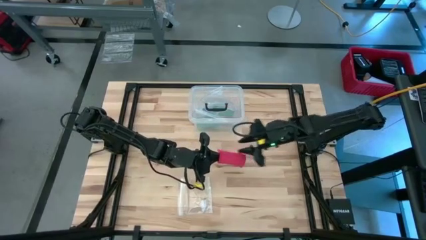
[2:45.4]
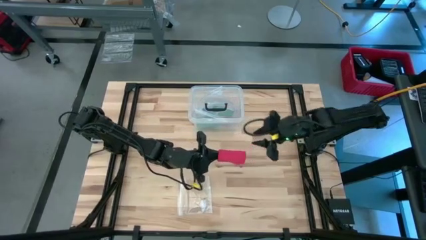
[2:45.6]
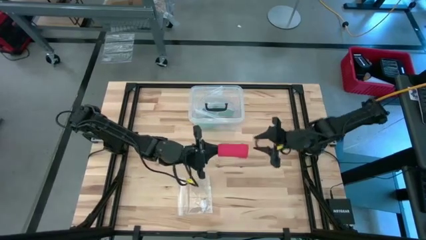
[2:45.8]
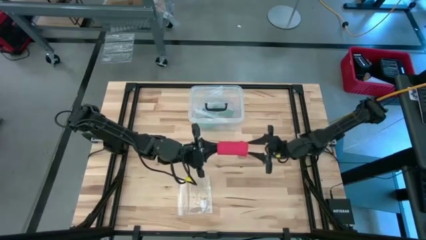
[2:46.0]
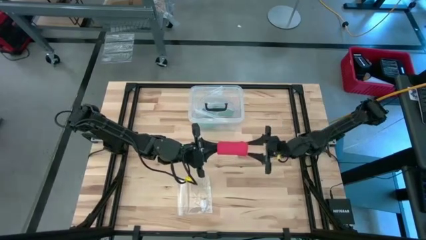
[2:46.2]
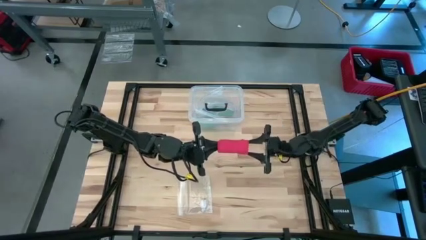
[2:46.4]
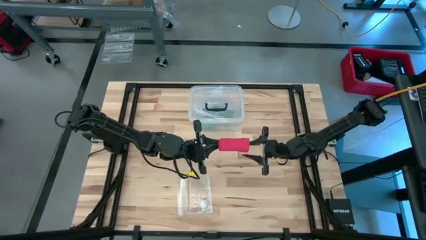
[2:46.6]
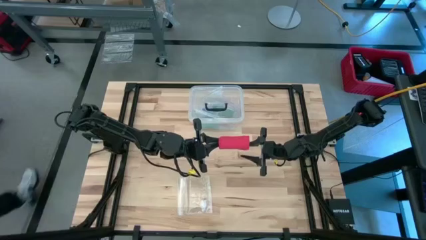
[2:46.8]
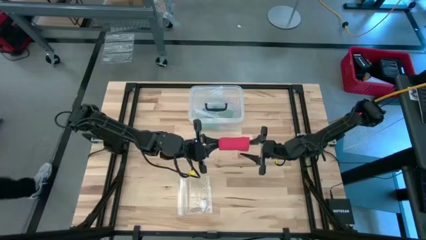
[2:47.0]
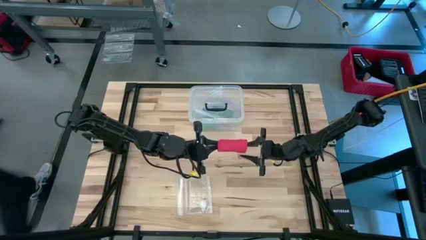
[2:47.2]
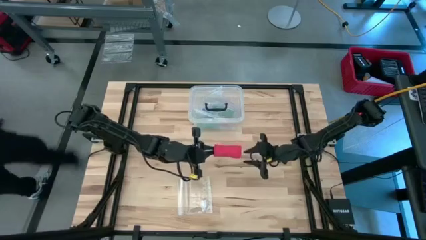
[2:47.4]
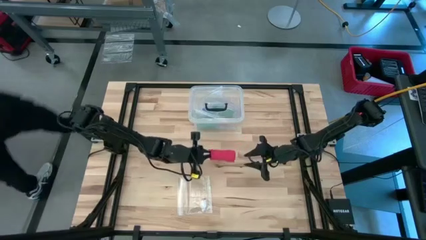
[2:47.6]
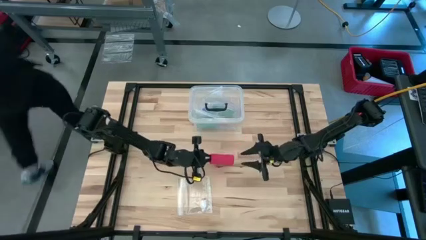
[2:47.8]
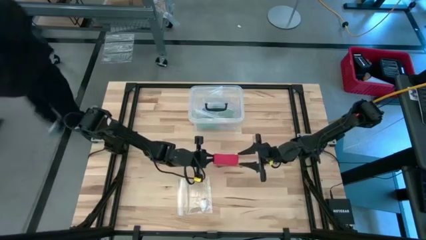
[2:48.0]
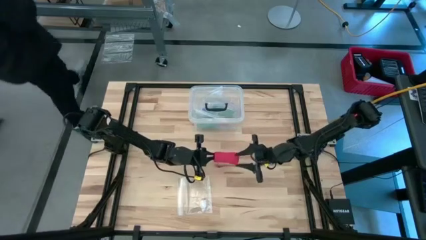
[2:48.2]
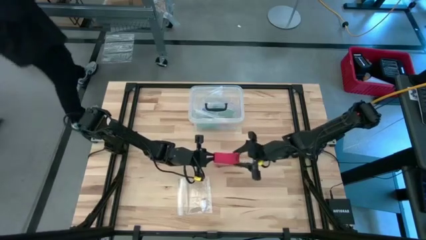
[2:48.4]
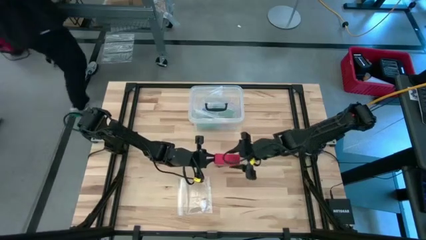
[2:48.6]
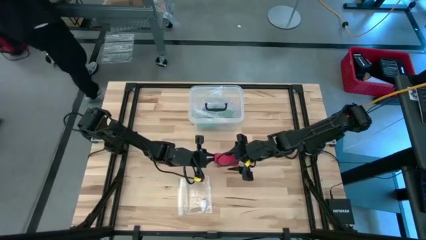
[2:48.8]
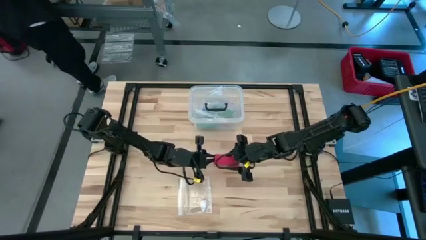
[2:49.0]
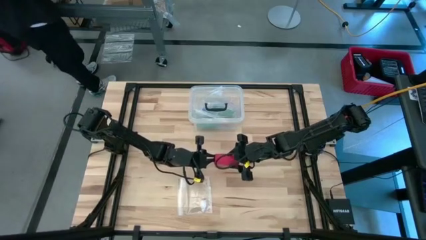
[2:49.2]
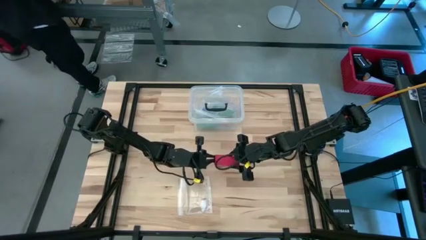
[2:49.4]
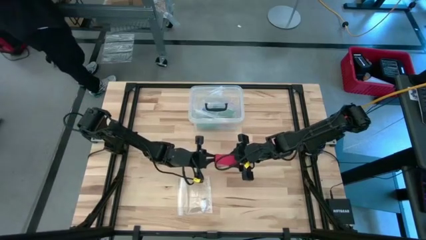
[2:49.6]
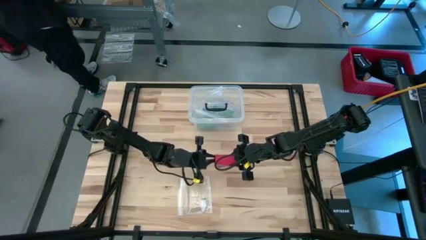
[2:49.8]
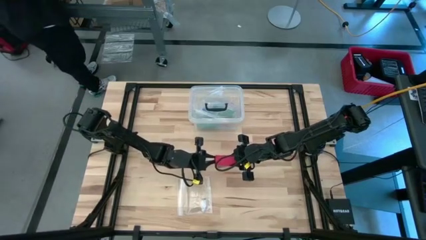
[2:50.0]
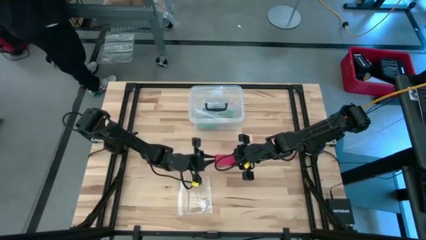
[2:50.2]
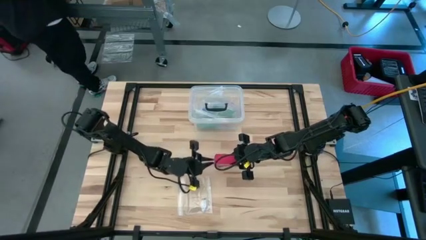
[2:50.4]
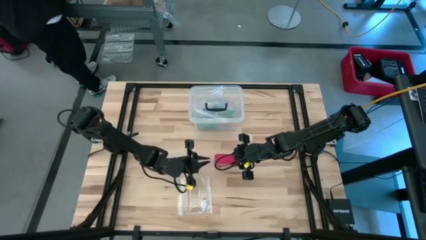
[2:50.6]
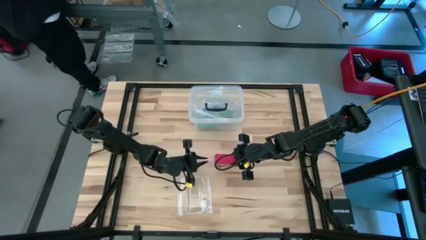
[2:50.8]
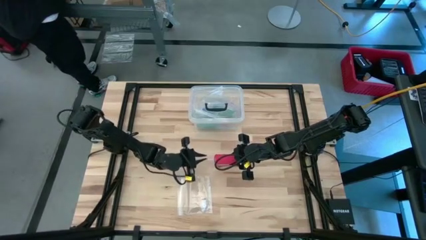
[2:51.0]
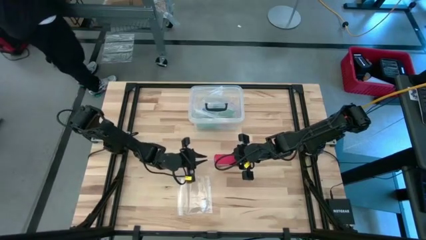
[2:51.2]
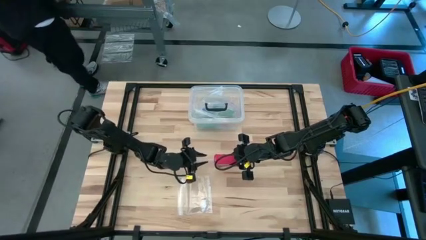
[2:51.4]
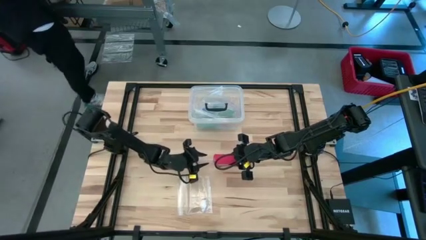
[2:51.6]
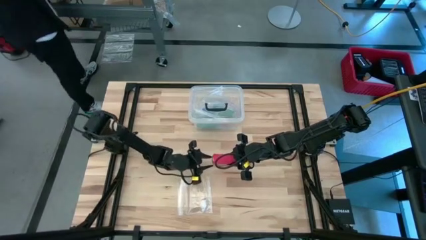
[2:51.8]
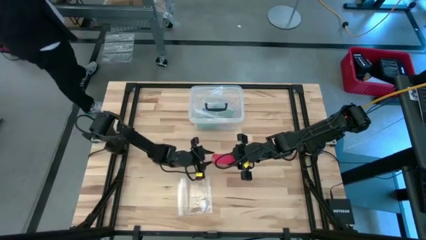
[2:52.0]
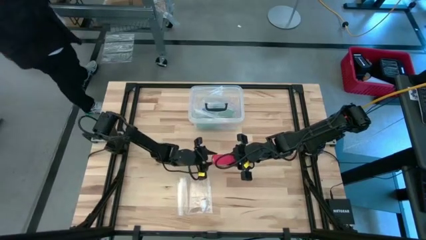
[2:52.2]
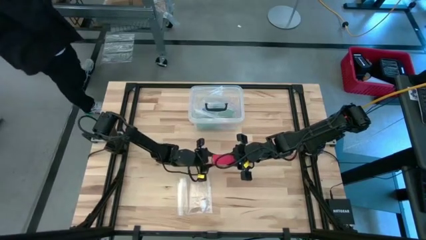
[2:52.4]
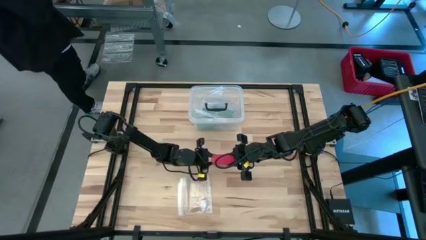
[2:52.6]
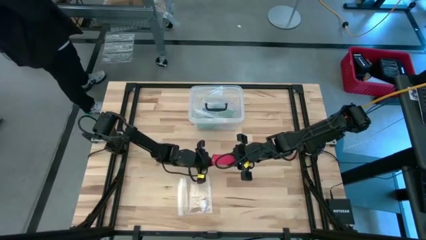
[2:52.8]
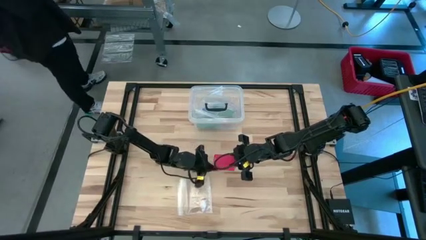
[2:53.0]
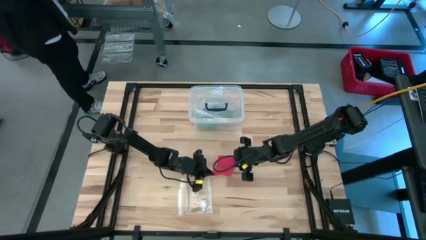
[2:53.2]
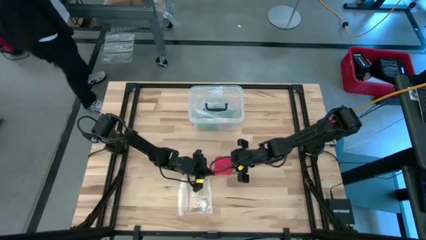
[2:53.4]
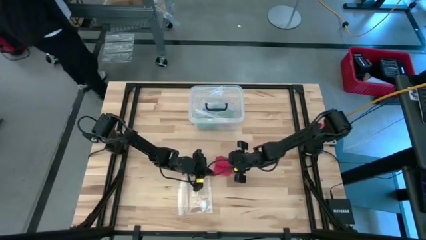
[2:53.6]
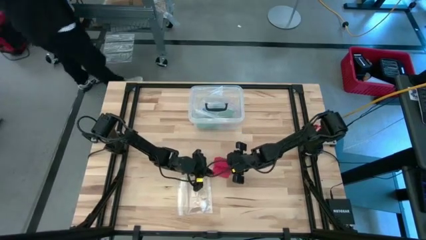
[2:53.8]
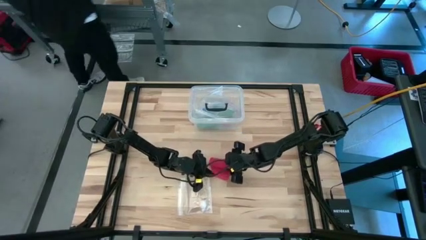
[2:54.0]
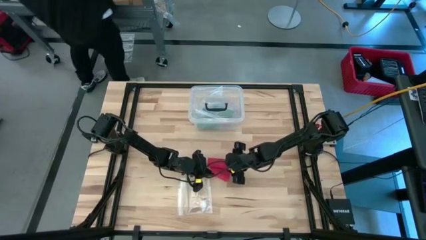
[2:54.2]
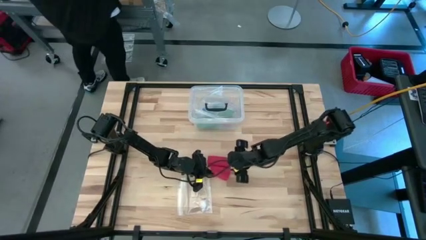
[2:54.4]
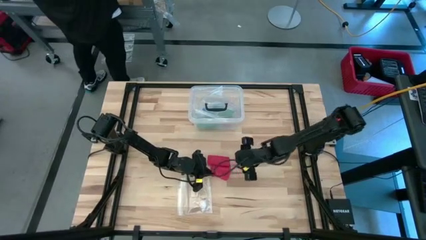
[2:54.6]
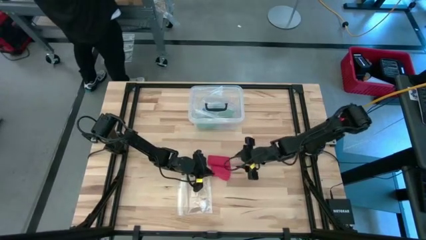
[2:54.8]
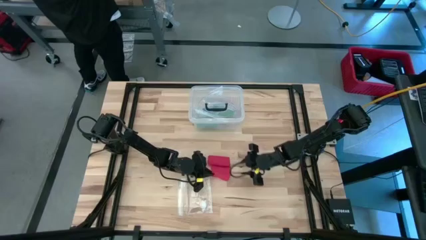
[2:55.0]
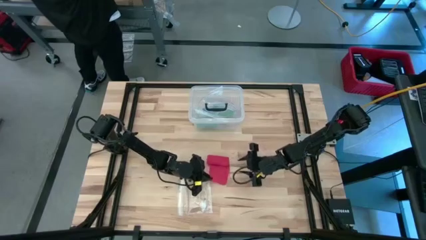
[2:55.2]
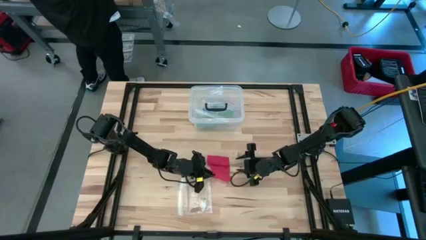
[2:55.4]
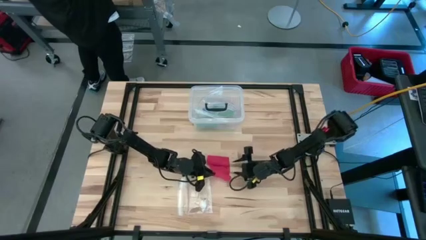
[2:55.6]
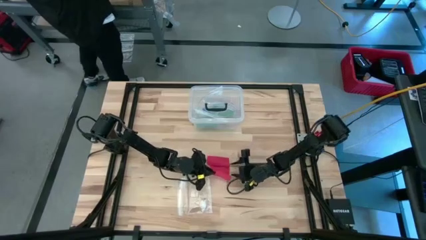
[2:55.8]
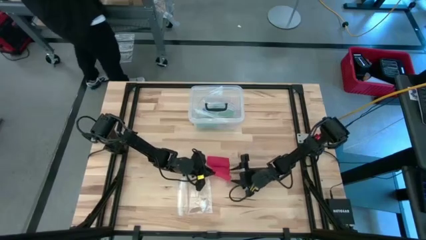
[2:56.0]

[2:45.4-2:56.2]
Task: Roll bandage
Roll the red bandage

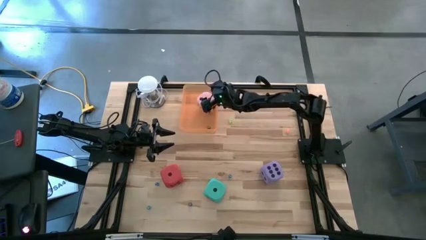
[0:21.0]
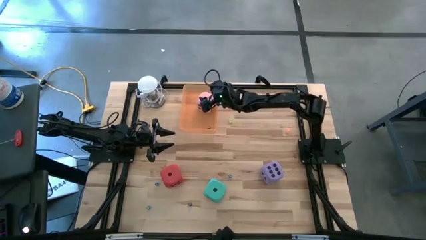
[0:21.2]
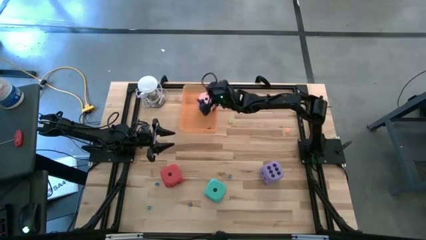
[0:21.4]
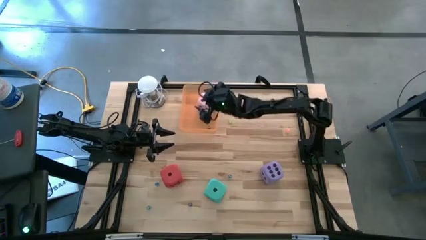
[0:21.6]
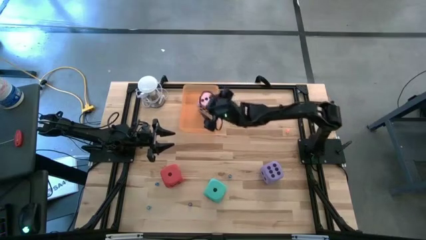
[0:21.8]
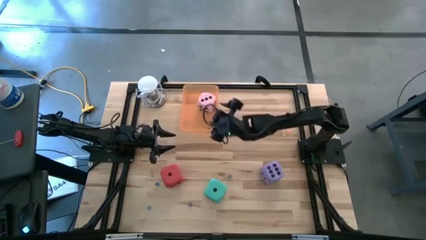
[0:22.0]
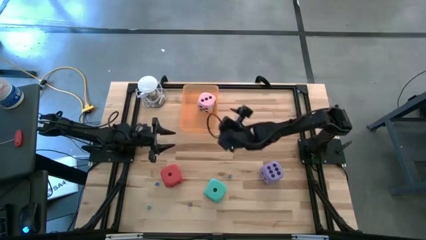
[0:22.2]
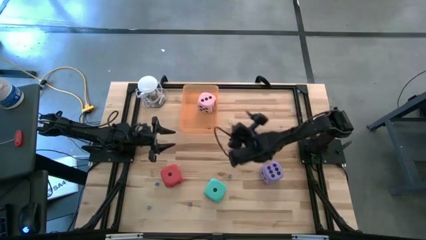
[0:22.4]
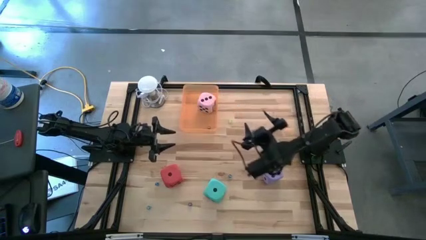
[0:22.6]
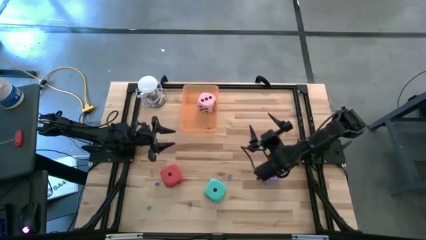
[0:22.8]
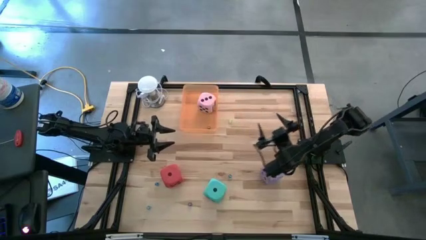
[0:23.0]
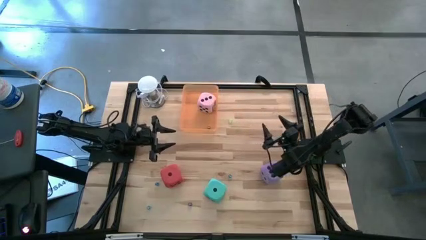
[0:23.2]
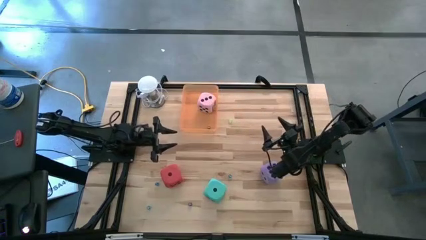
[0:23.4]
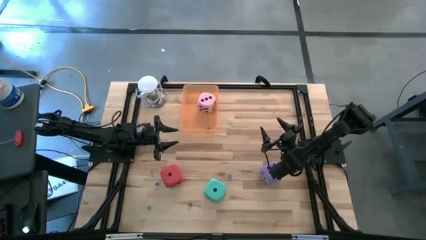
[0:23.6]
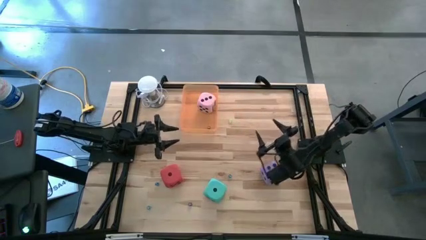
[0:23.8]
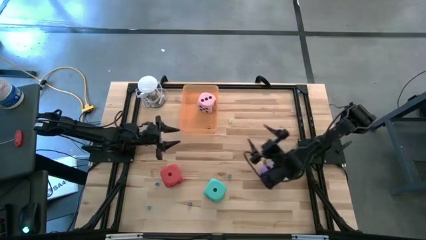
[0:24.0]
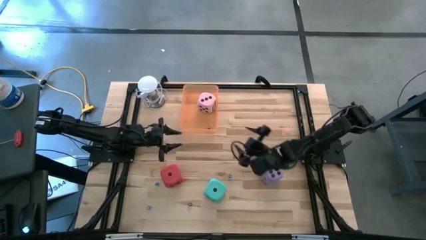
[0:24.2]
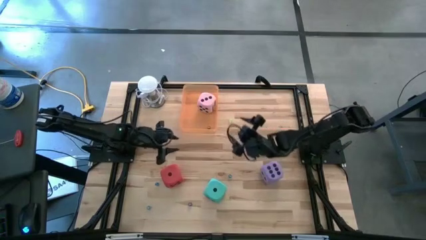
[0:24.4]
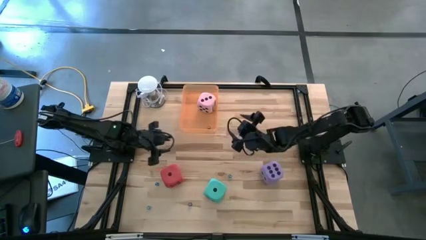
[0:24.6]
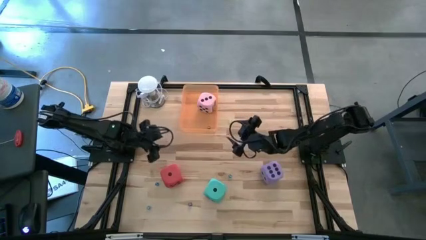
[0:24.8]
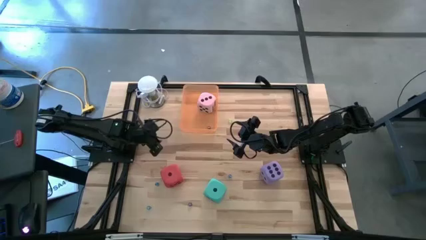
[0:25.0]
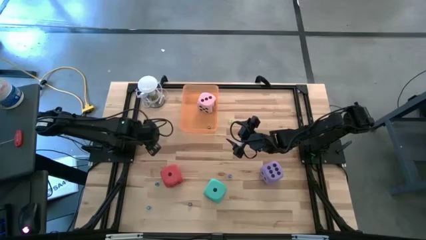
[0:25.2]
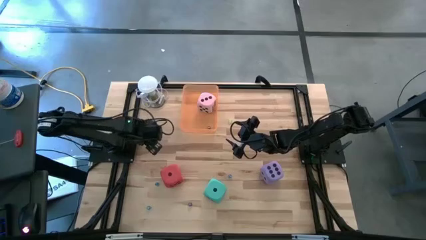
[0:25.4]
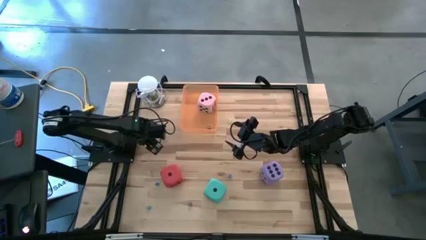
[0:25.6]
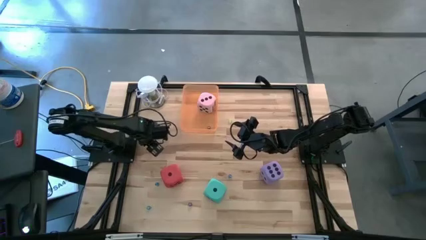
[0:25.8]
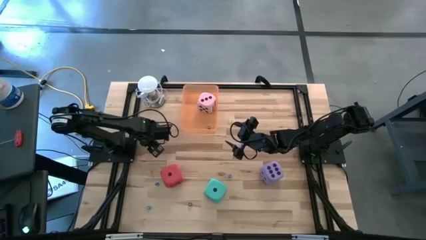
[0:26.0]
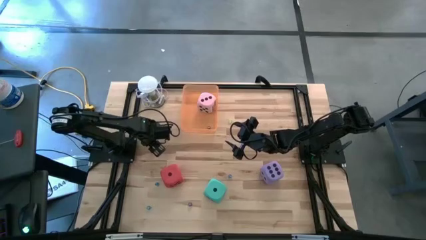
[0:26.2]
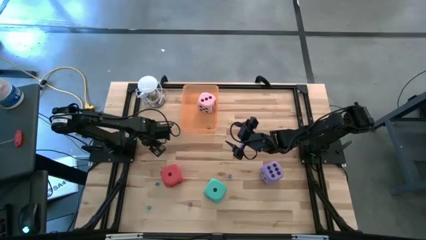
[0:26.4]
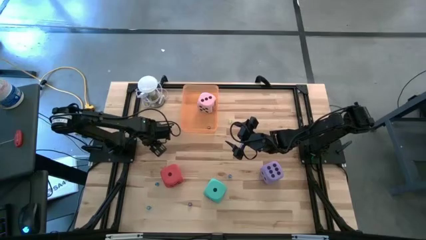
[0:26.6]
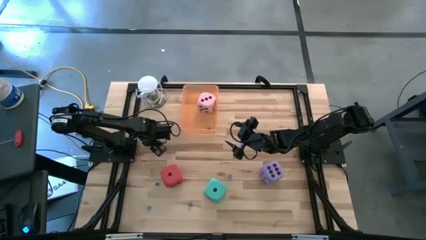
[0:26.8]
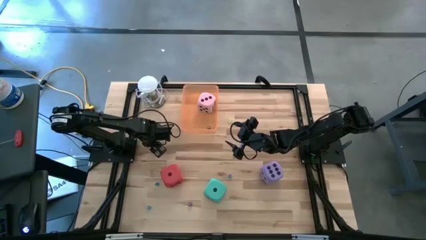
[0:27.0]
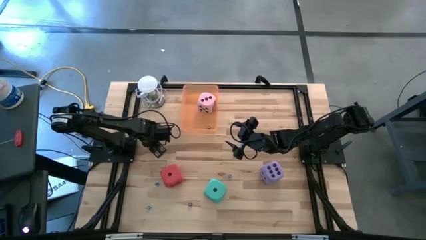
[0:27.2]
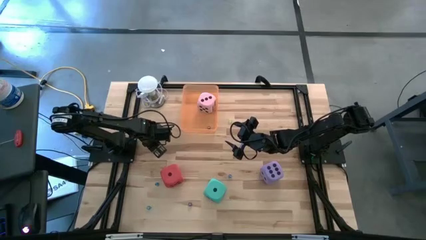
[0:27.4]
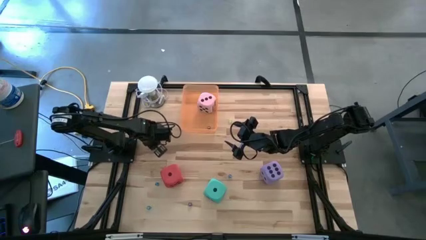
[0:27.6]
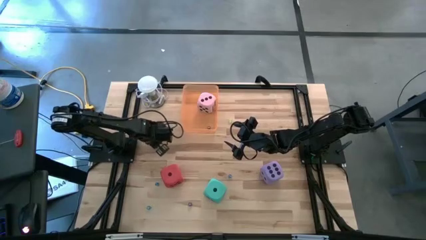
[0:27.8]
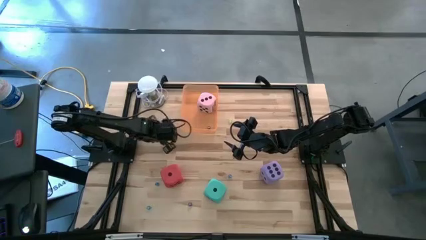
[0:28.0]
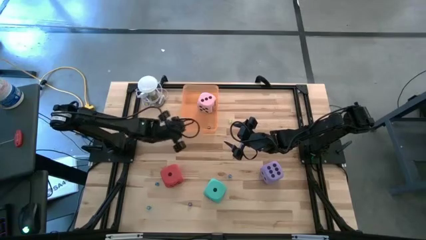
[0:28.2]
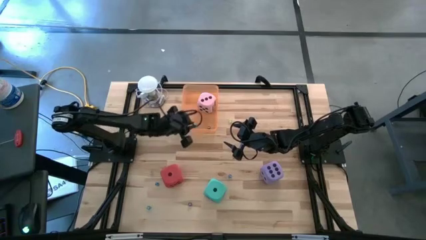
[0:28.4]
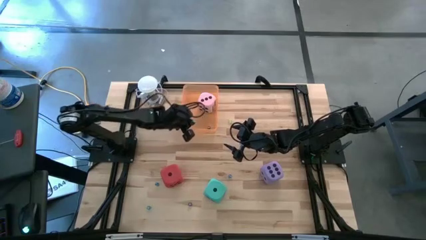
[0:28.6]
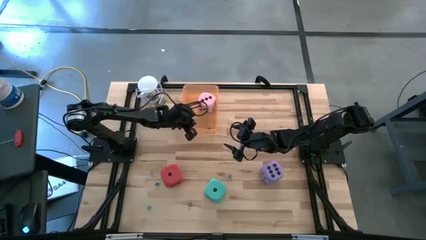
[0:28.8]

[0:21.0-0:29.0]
Task: Pick & Place Dice
Put the small blue die into the orange bin
